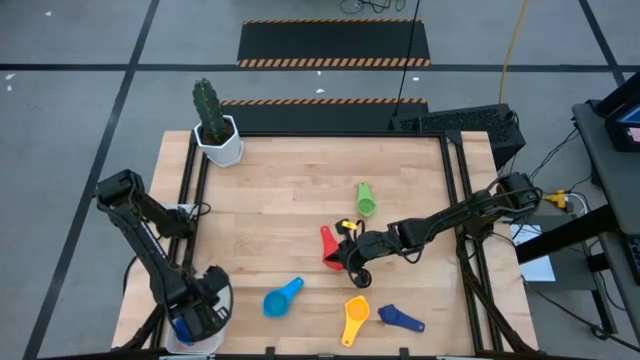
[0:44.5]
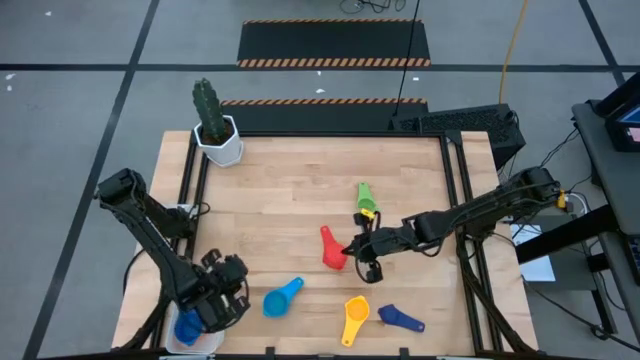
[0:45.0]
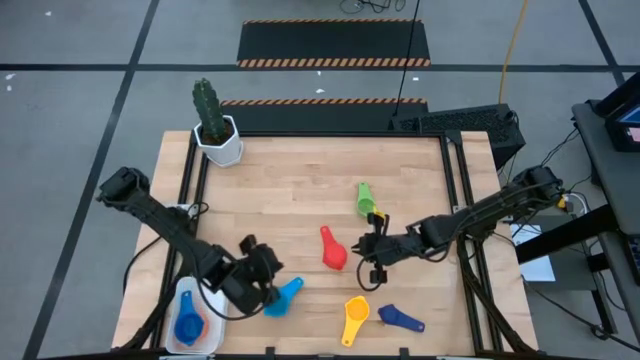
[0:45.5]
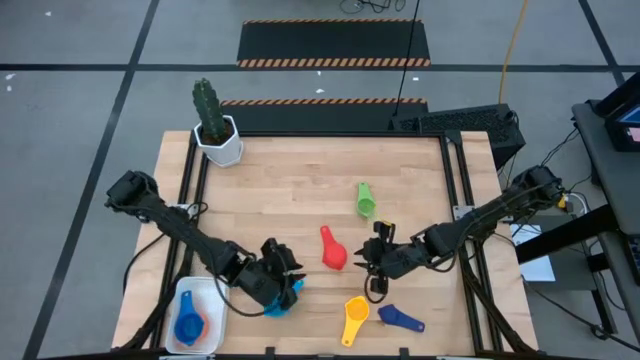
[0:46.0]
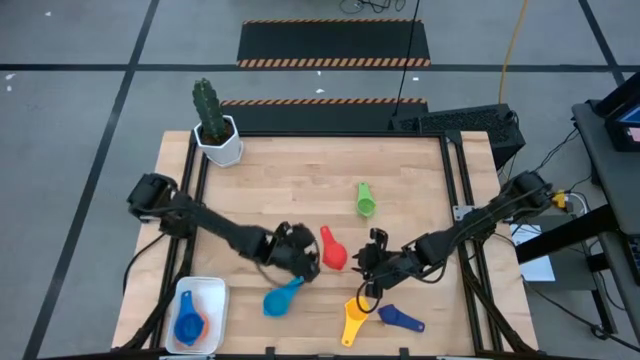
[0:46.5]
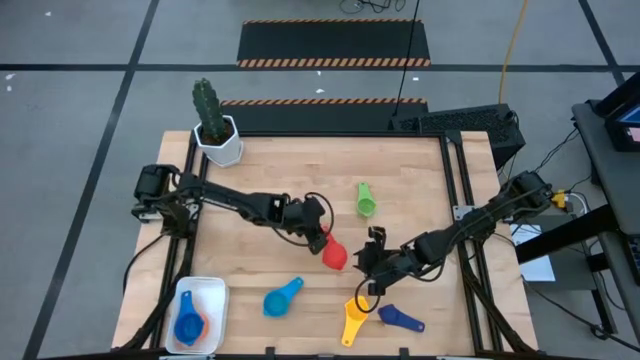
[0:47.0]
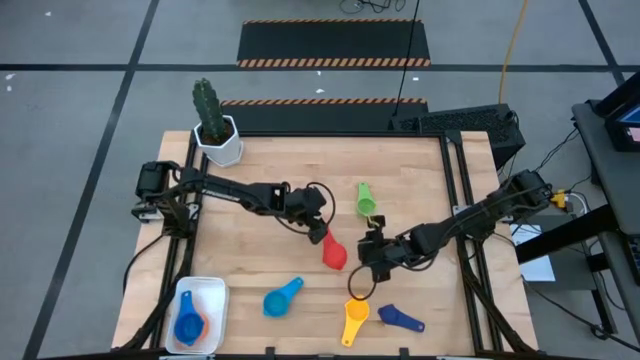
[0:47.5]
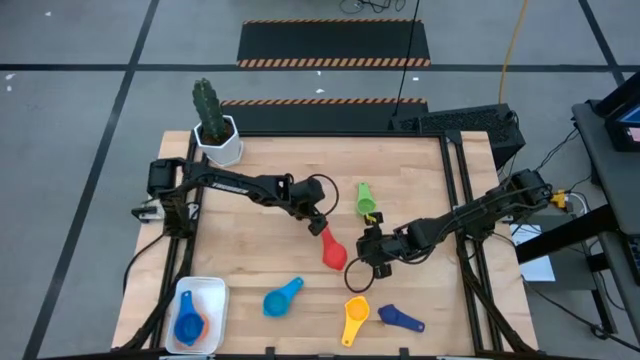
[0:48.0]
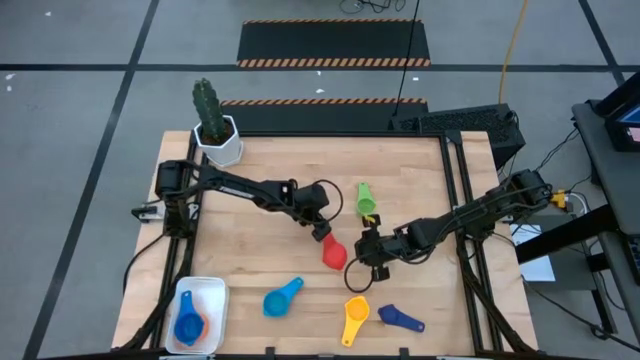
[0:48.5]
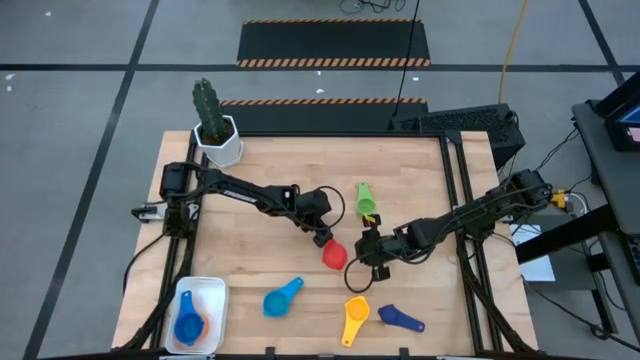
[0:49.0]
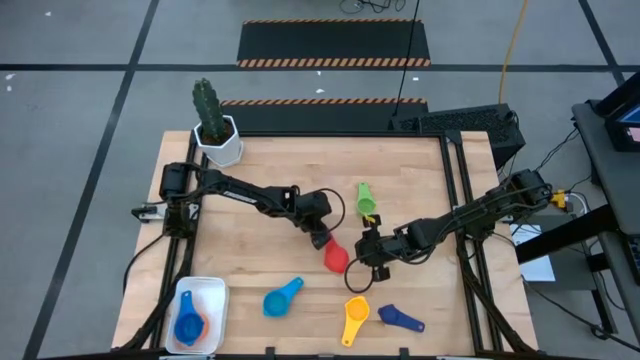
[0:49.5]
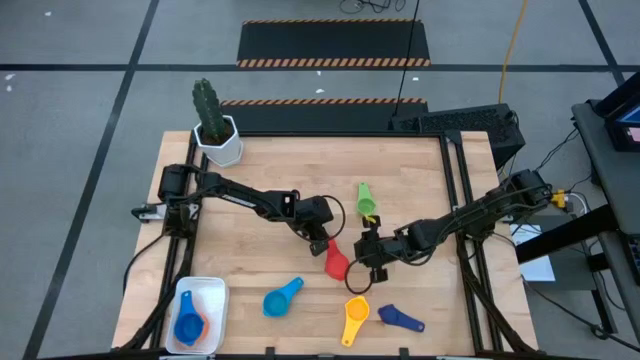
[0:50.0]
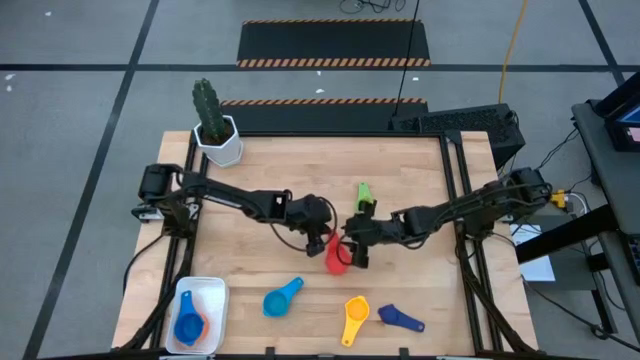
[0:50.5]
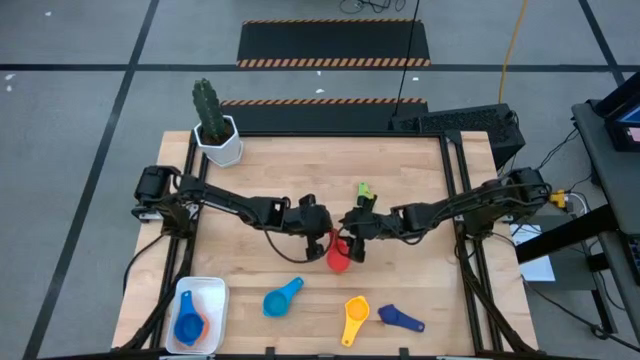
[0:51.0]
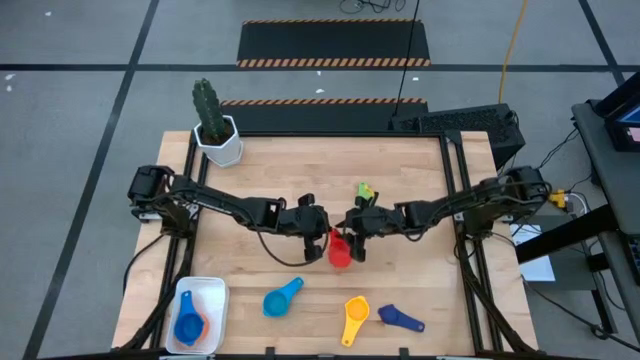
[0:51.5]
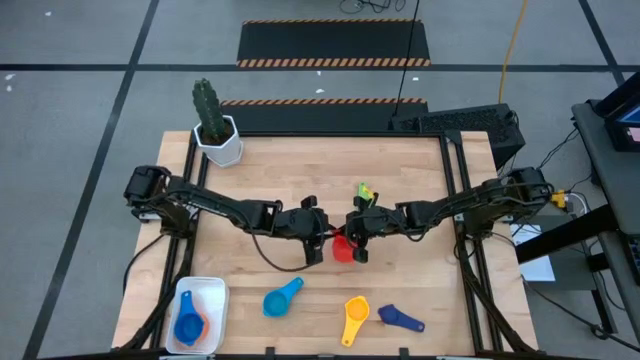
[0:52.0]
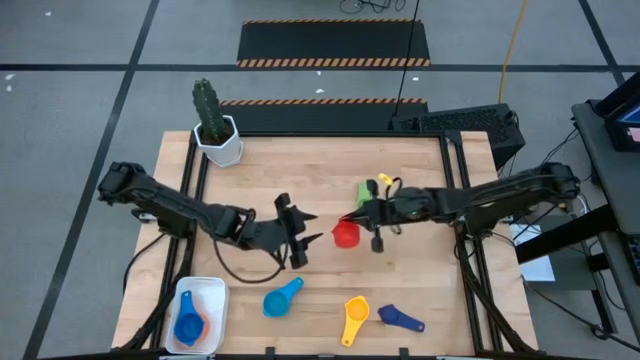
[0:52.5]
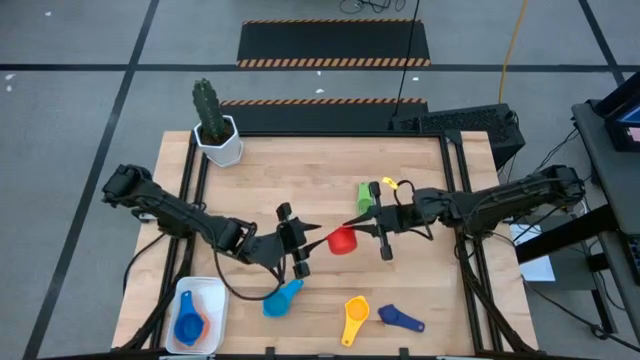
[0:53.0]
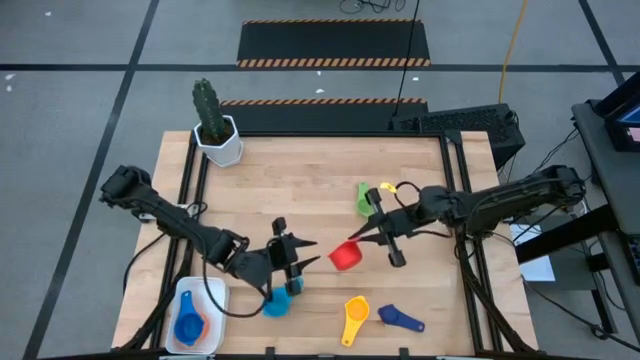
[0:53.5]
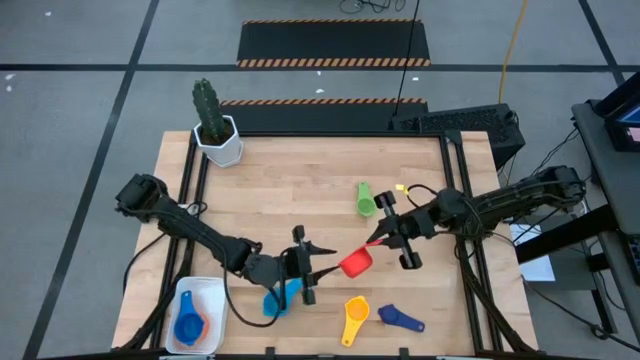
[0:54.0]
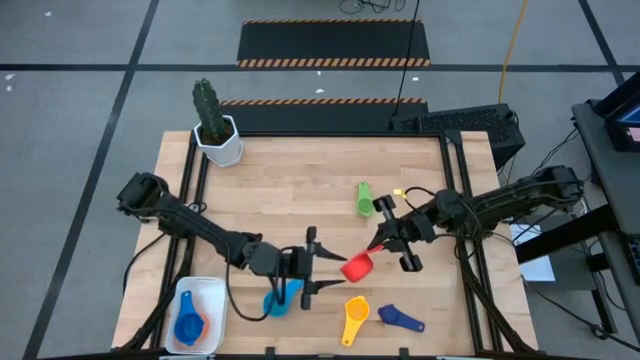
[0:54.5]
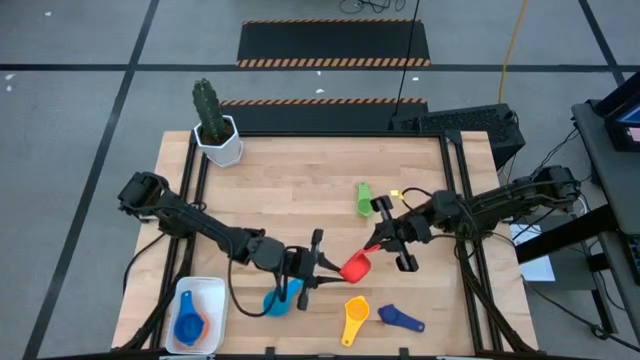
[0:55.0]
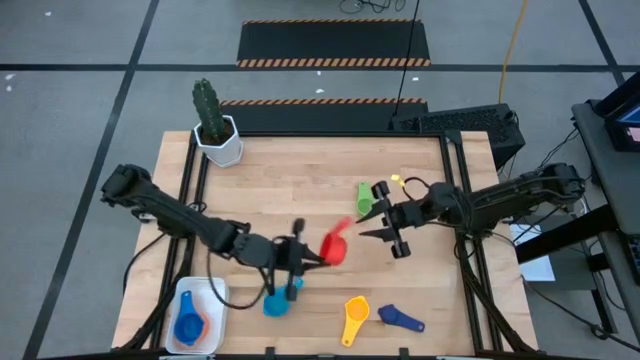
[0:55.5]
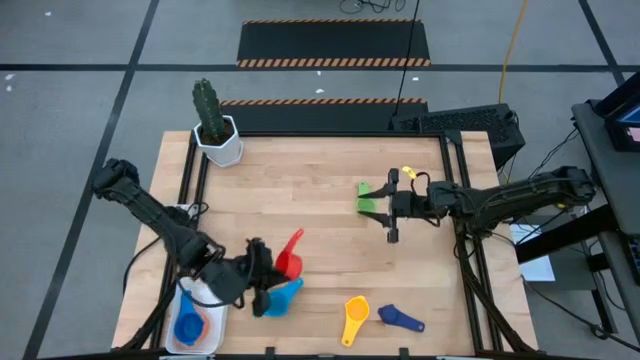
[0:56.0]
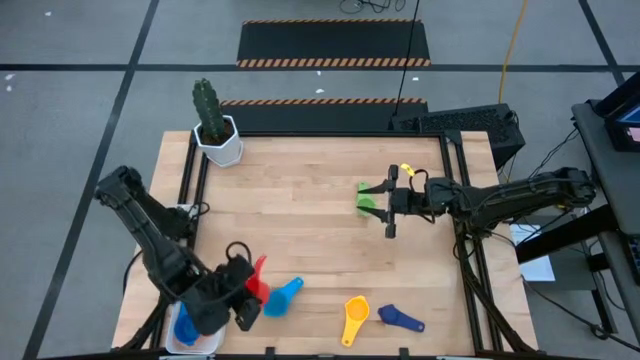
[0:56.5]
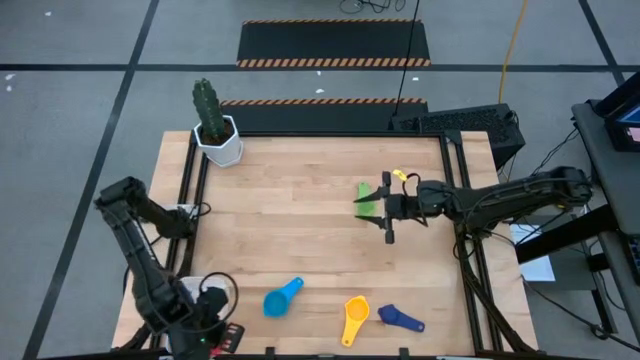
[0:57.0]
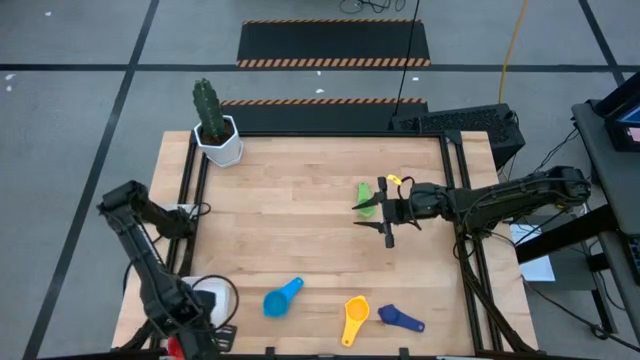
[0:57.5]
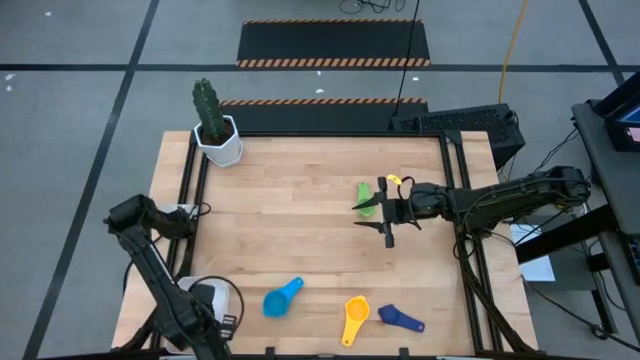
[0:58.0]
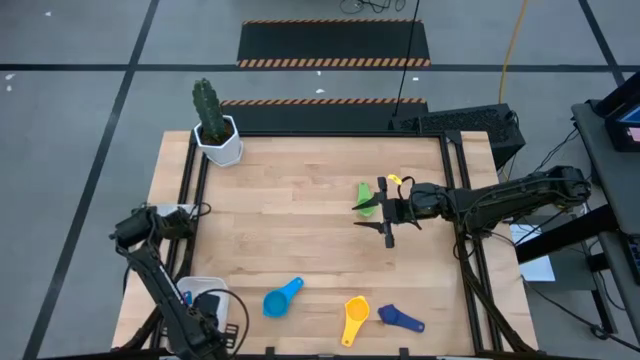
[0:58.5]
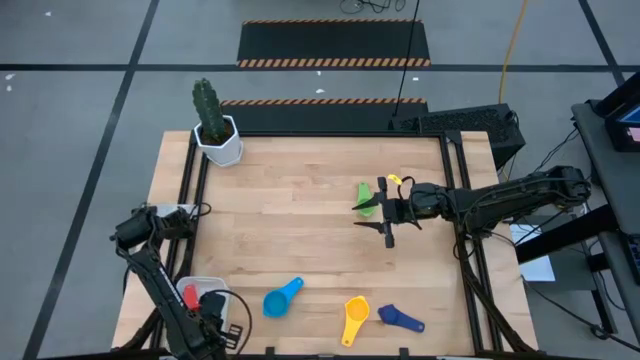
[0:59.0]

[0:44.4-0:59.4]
Task: Nest measuring cups in basket
Stack the red measuring cup on top of the blue measuring cup into the white bin
